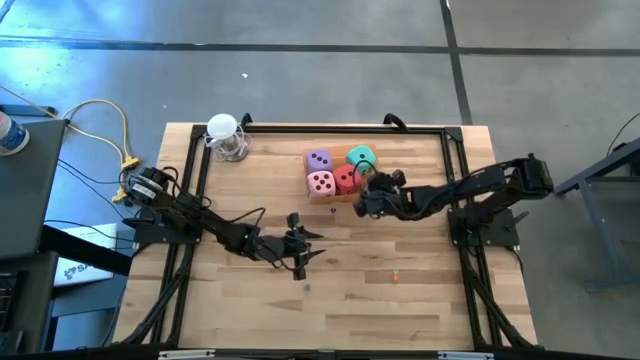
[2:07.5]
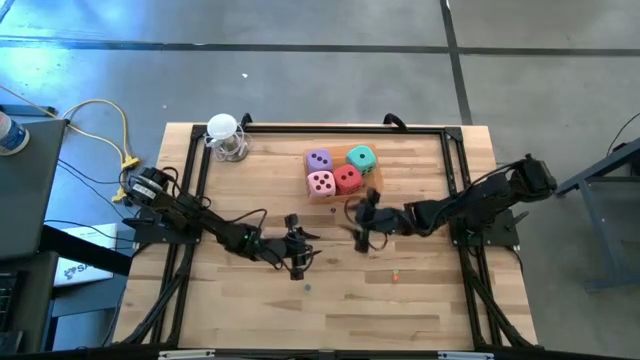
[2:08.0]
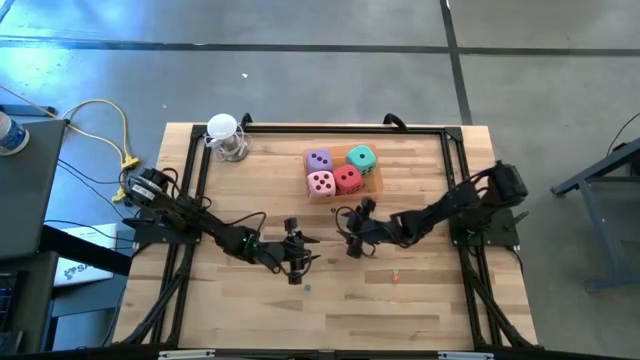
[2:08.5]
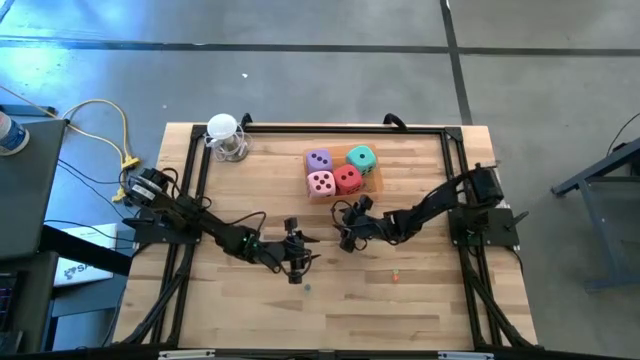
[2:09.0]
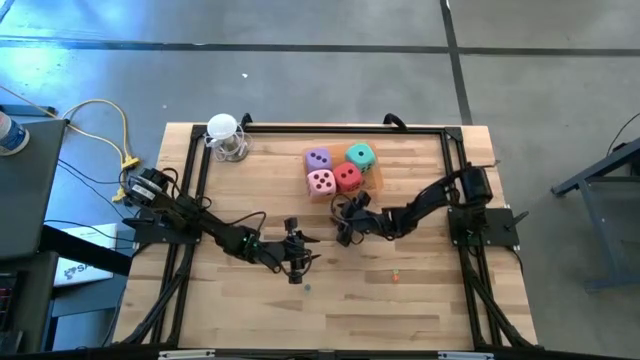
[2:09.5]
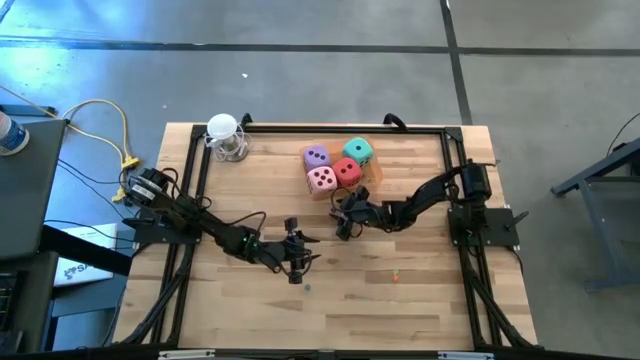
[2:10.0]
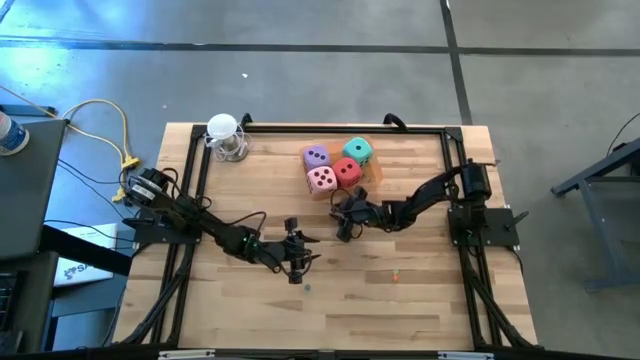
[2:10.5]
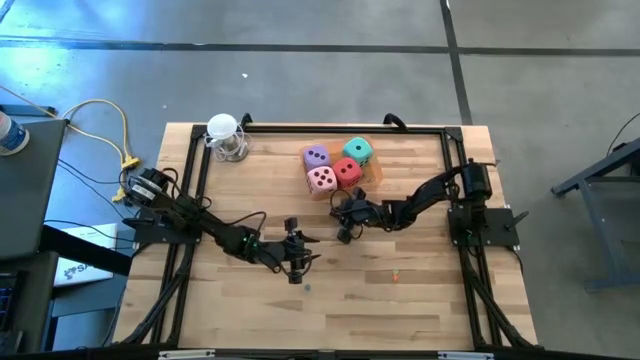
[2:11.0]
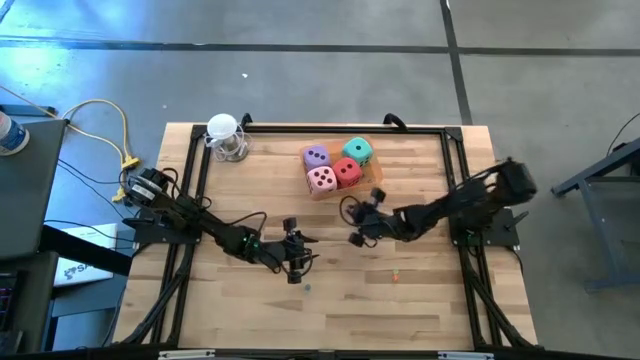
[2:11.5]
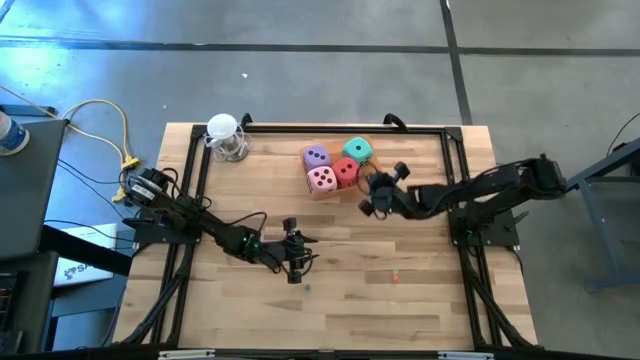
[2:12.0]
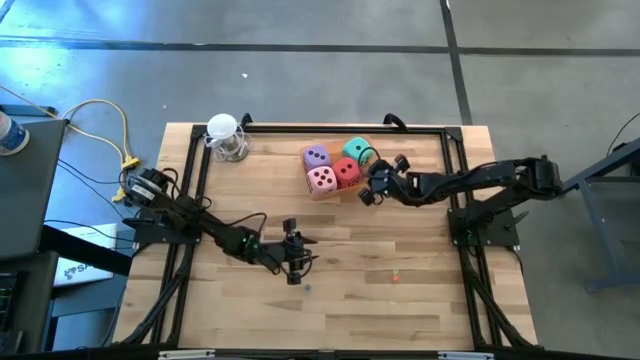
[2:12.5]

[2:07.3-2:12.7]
Task: Pick & Place Dice
Put the small blue dice into the orange container

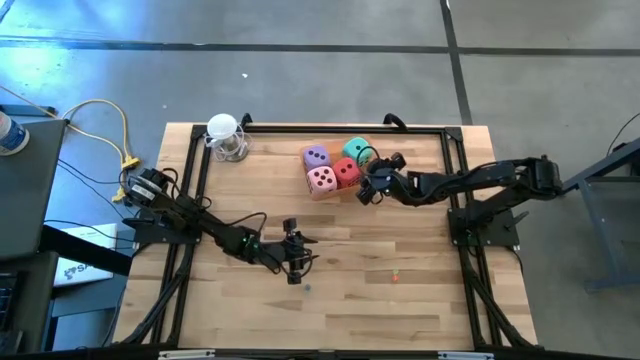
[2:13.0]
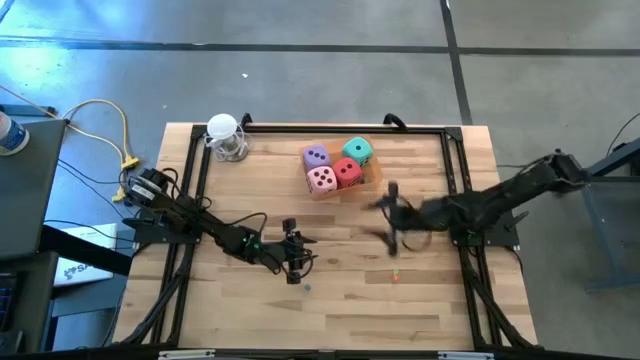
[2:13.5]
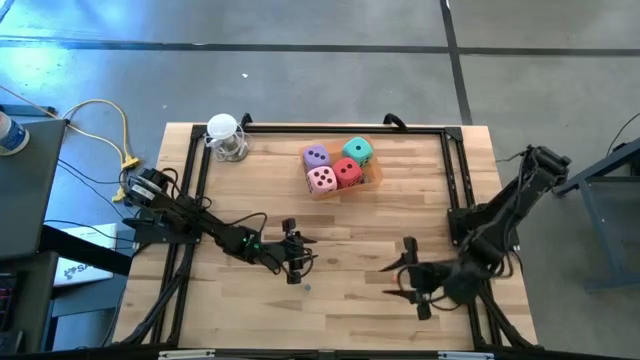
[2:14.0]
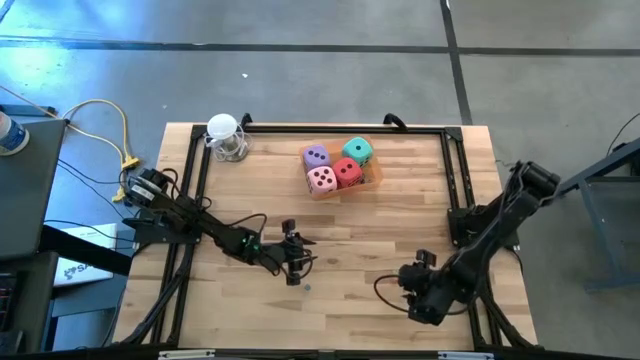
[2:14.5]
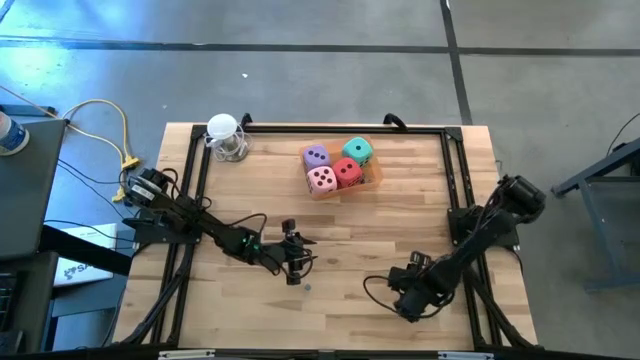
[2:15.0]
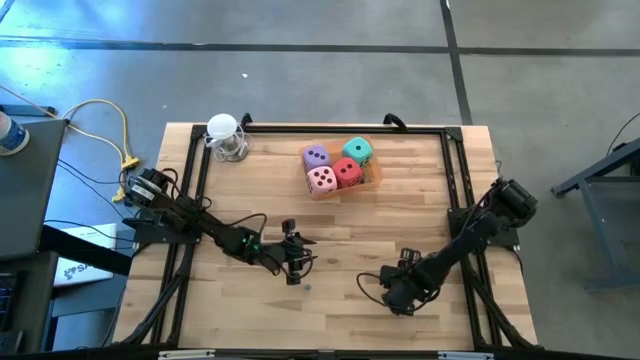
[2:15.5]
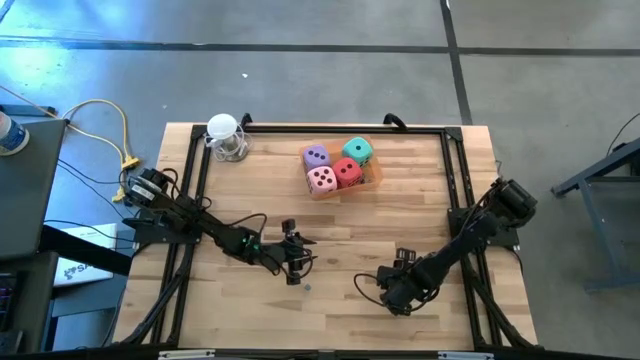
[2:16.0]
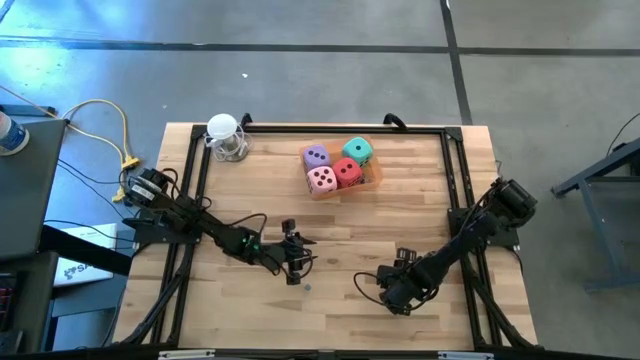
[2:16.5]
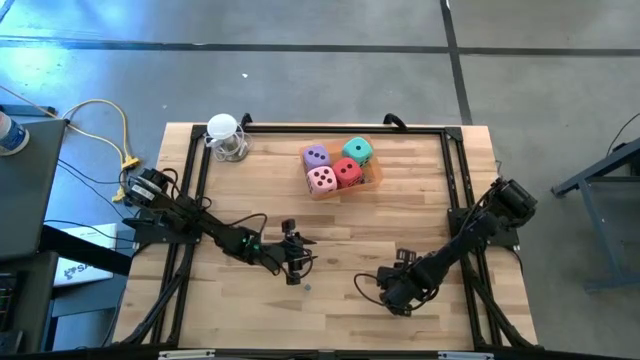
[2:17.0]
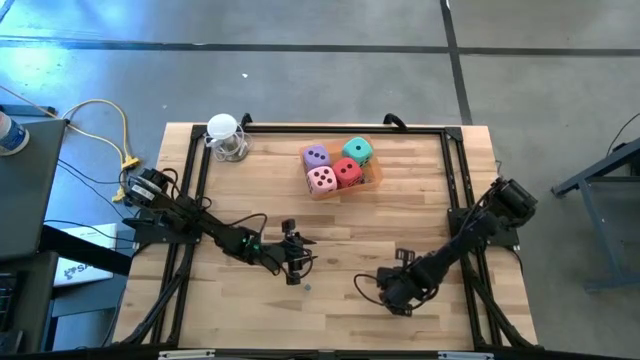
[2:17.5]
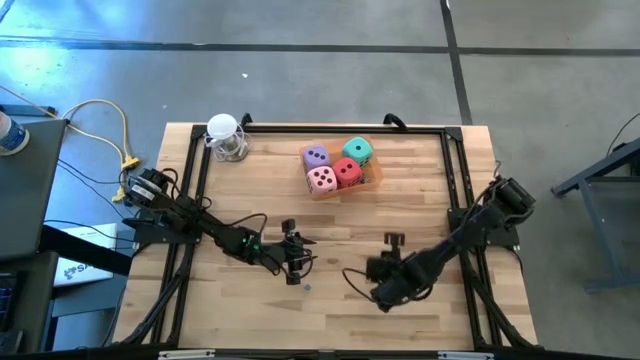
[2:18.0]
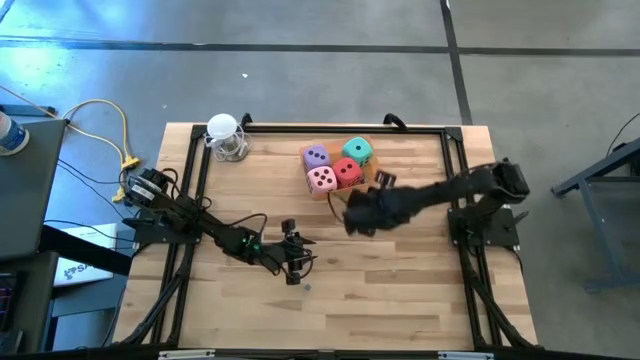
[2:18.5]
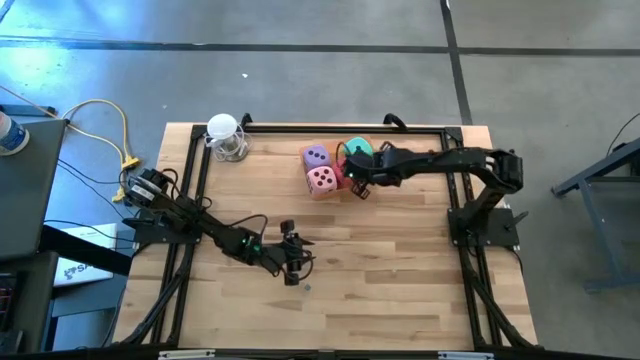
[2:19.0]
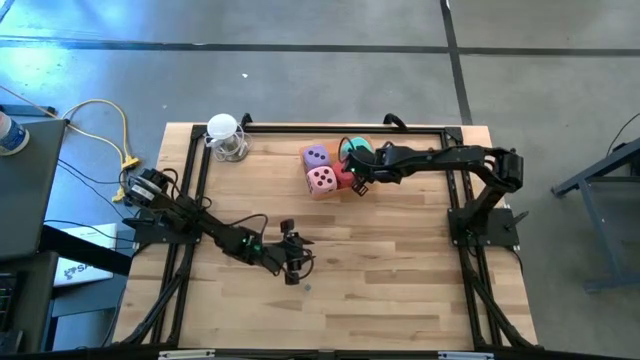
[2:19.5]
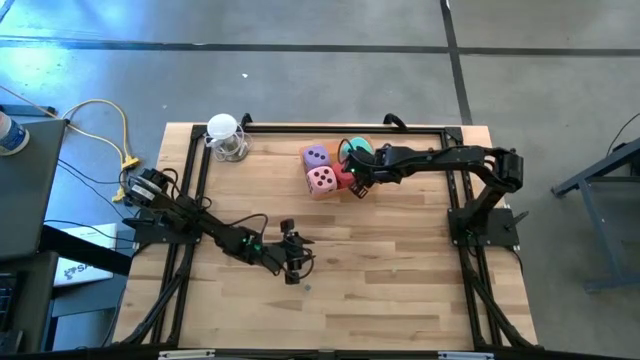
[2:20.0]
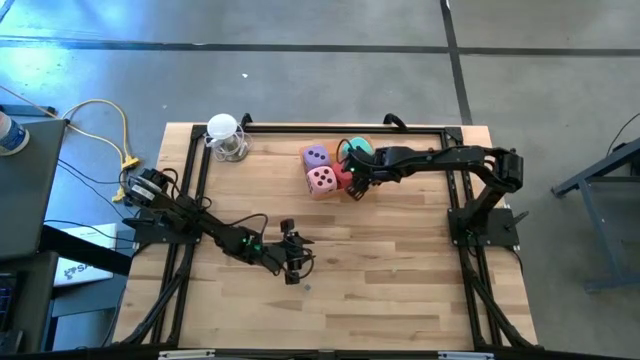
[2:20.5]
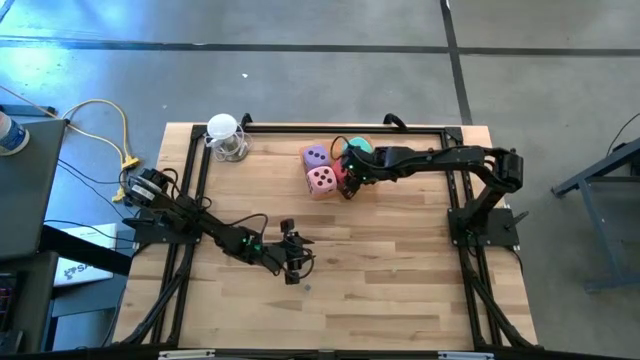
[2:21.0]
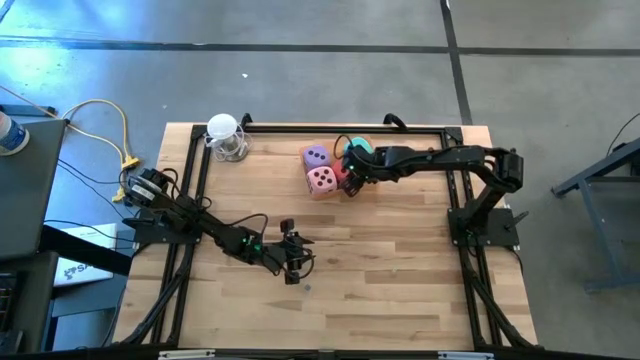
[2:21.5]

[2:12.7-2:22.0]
Put the small orange dice into the orange container

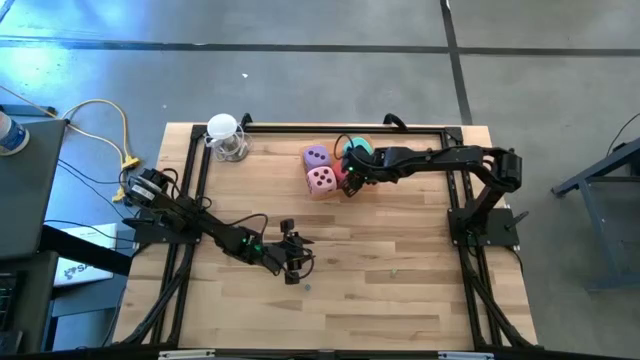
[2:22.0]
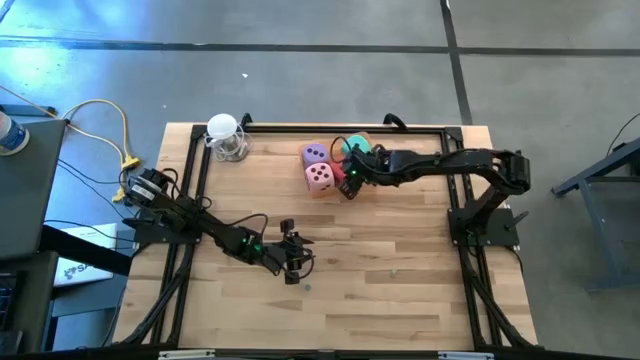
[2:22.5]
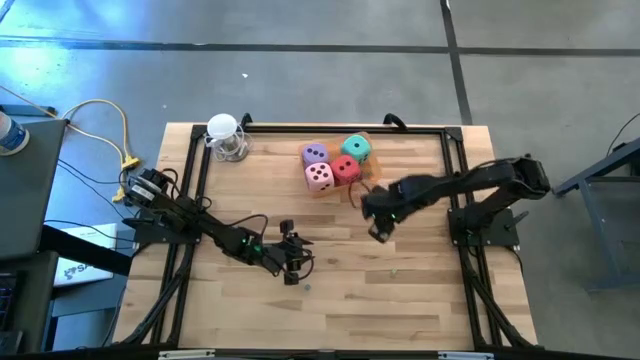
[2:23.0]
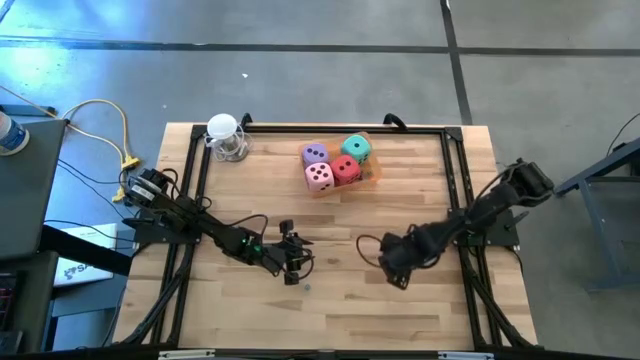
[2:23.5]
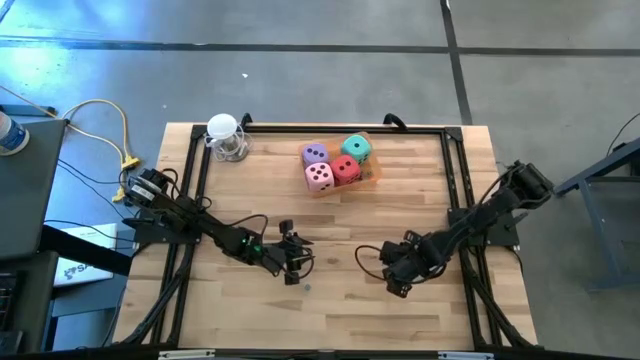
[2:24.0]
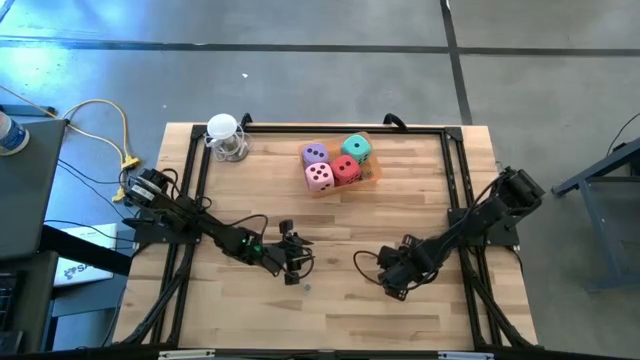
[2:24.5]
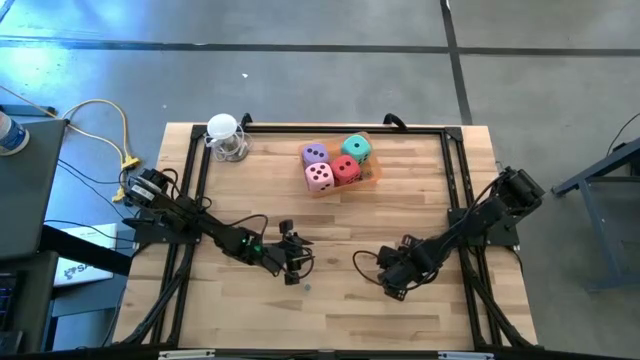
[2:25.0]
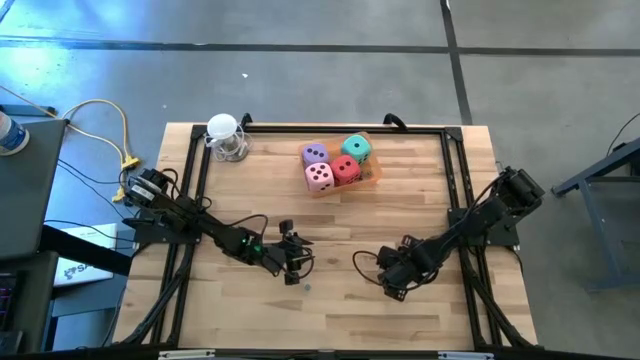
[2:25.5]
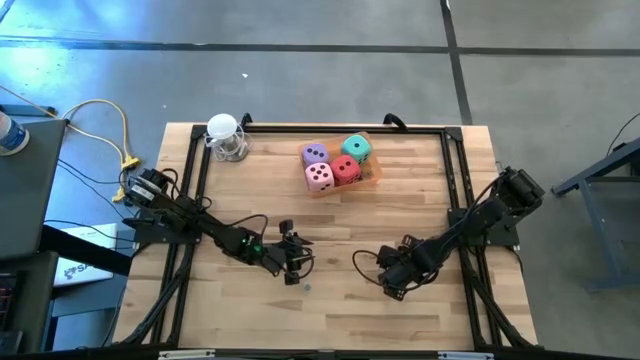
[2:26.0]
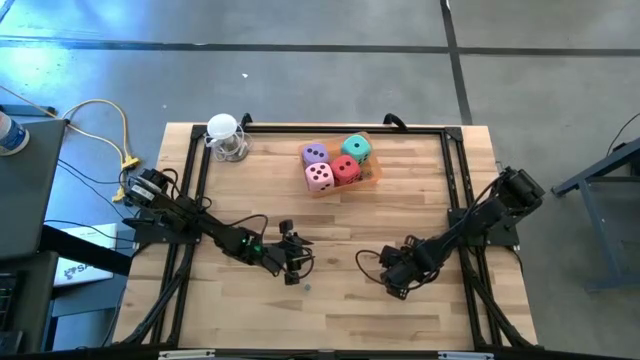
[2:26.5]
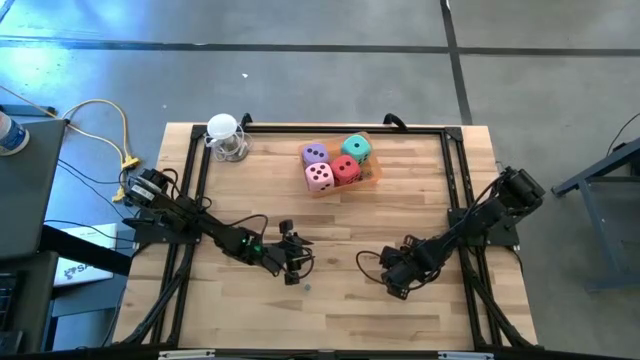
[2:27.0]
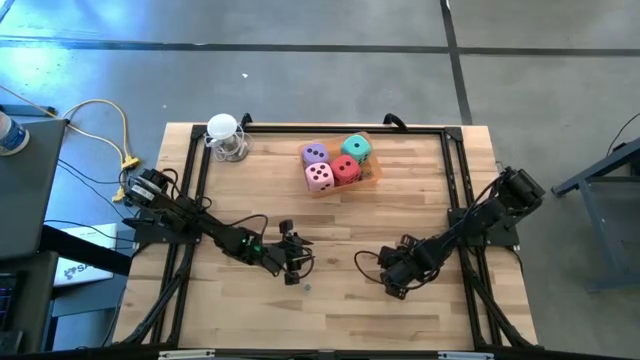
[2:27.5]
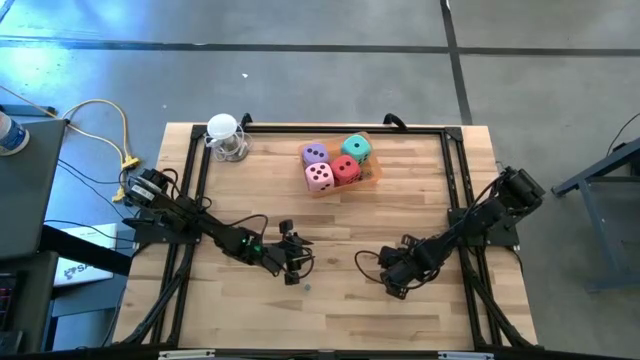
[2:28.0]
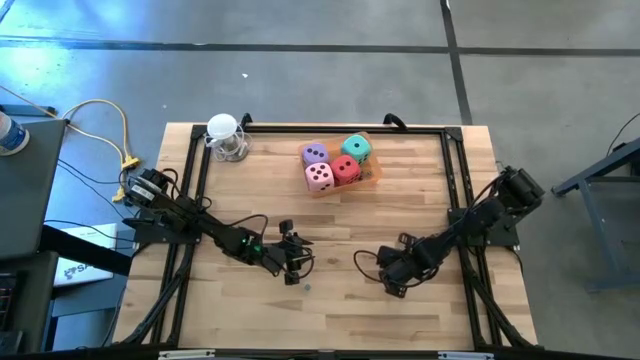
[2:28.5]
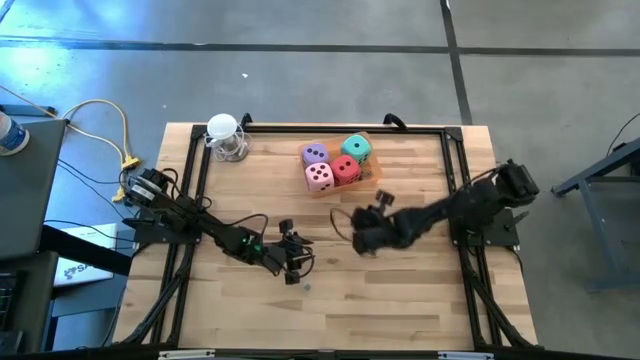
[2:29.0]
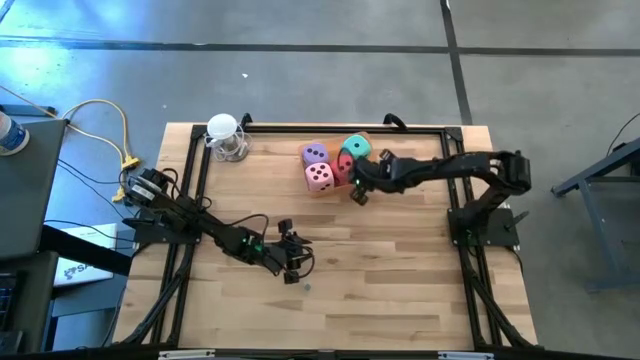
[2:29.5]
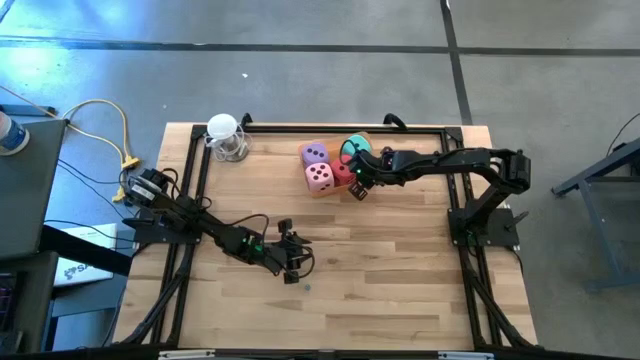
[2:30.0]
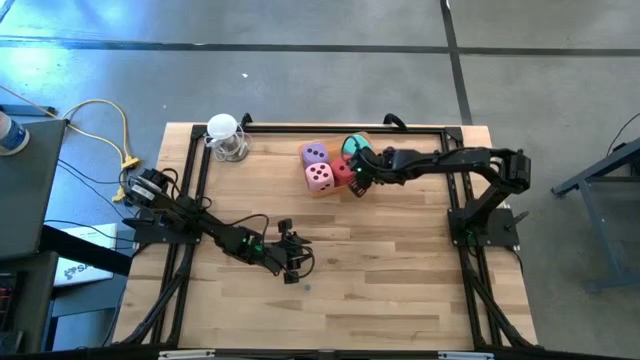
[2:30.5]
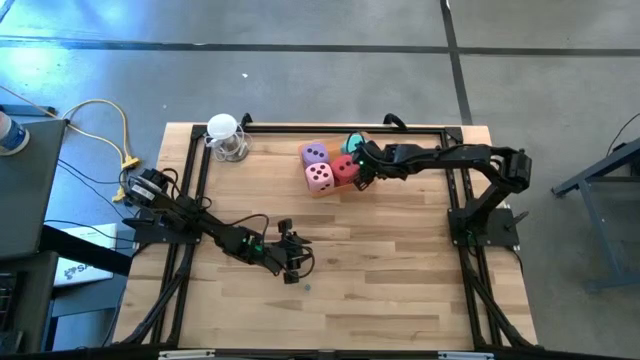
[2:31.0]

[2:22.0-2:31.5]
Put the small green dice into the orange container
